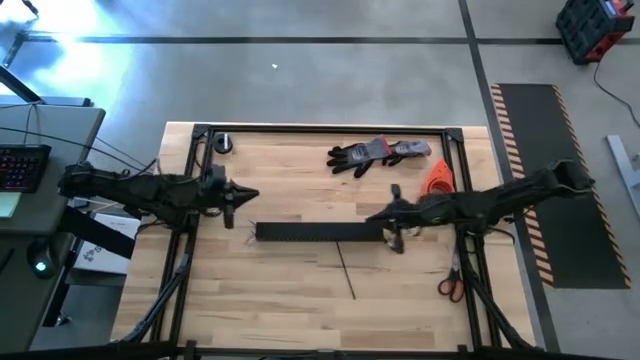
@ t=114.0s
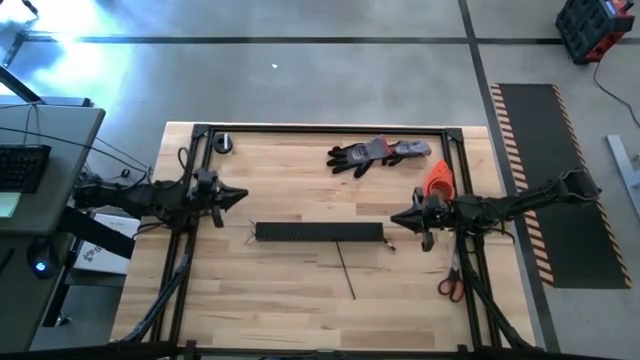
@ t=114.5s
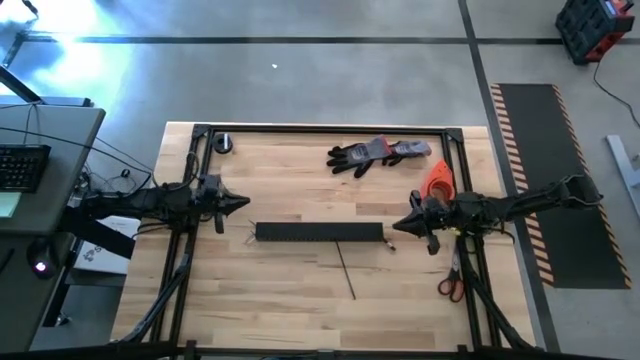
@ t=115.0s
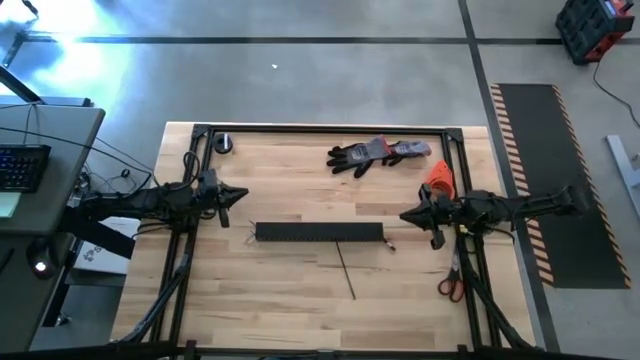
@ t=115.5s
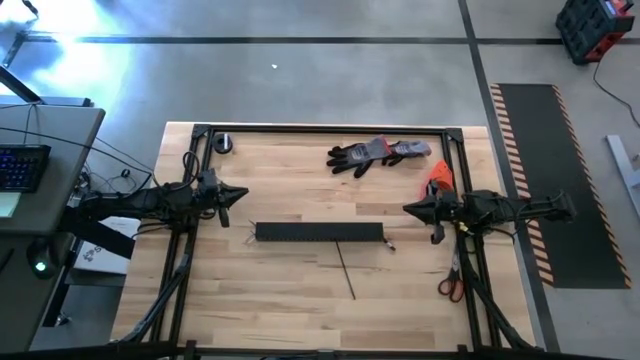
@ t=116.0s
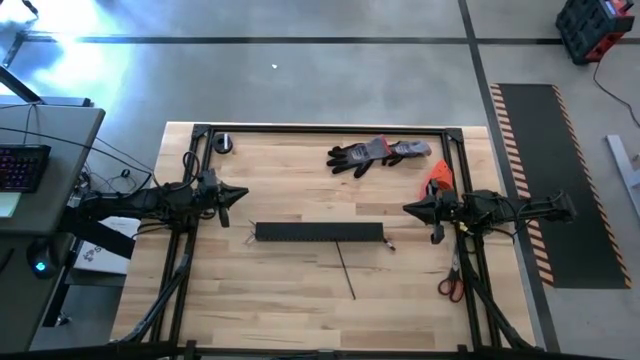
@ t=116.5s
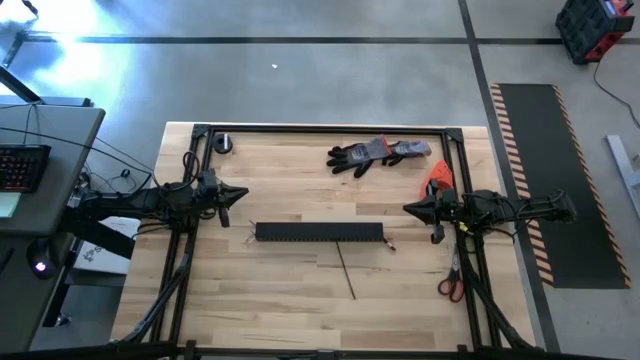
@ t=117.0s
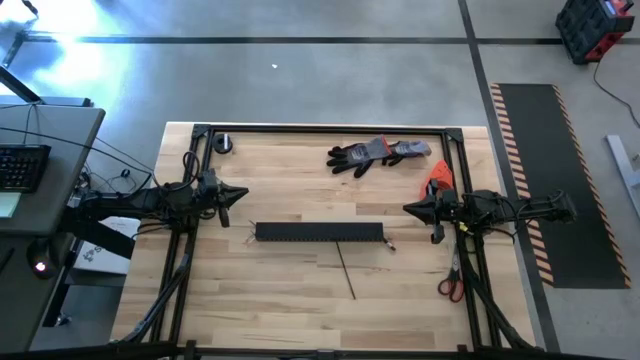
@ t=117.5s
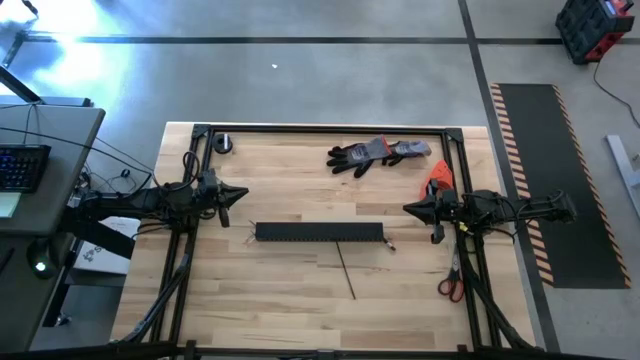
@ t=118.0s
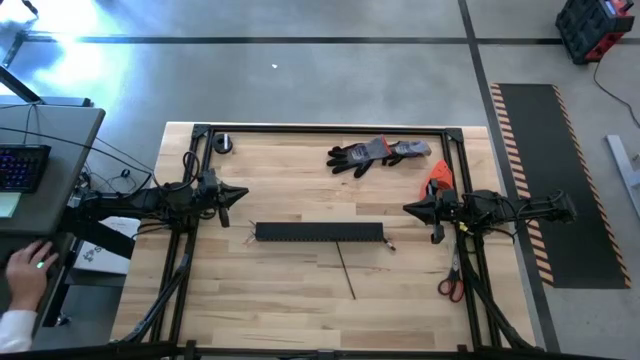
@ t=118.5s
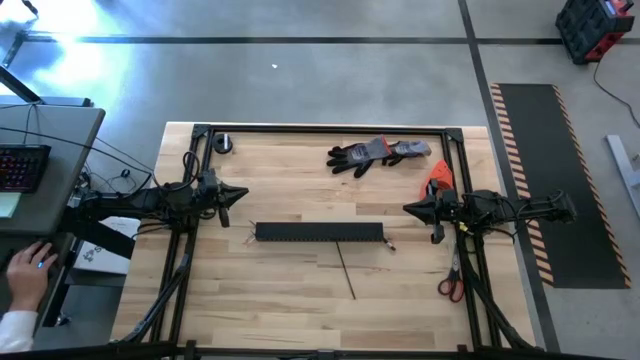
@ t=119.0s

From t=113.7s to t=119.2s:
Task: Ziptie cables
Return to Home Position

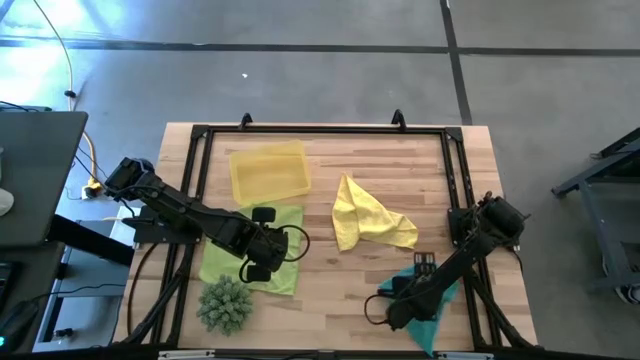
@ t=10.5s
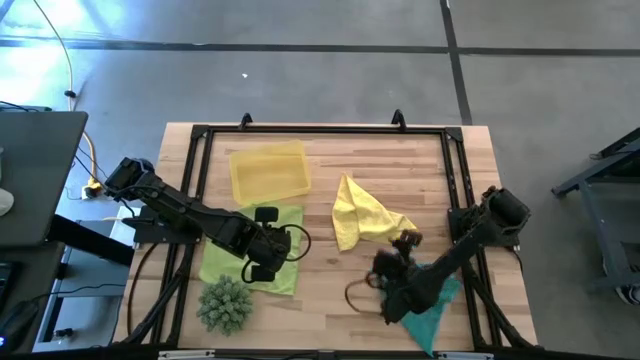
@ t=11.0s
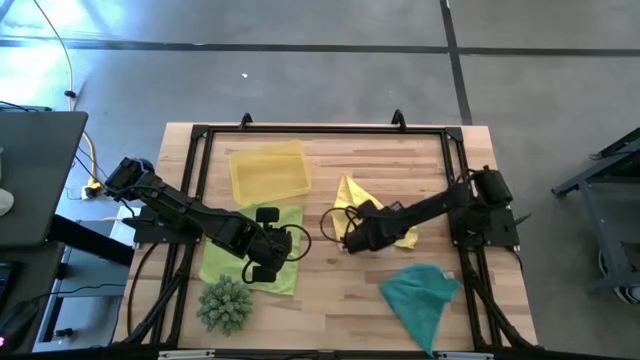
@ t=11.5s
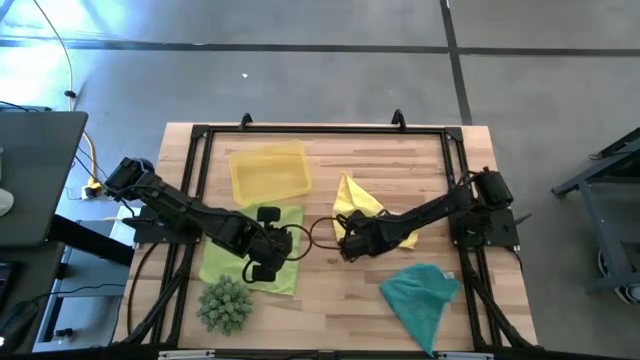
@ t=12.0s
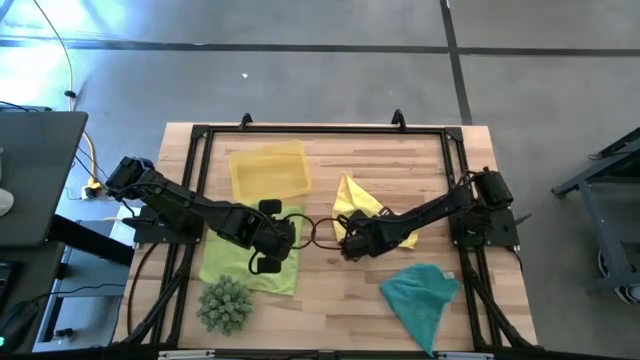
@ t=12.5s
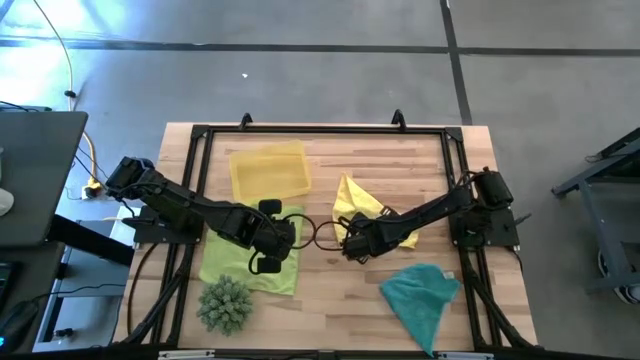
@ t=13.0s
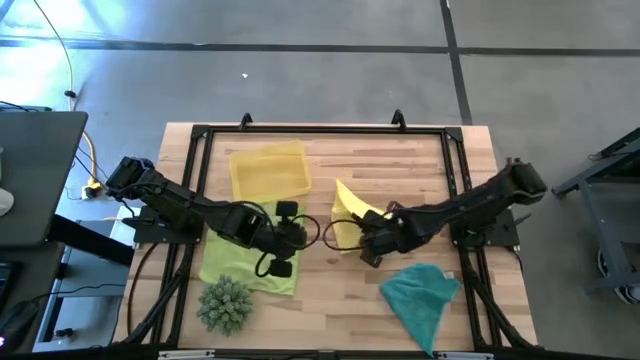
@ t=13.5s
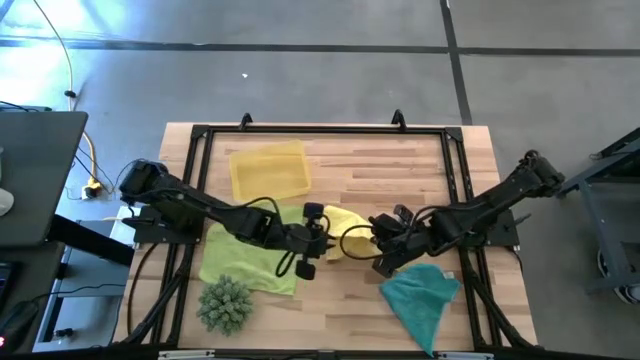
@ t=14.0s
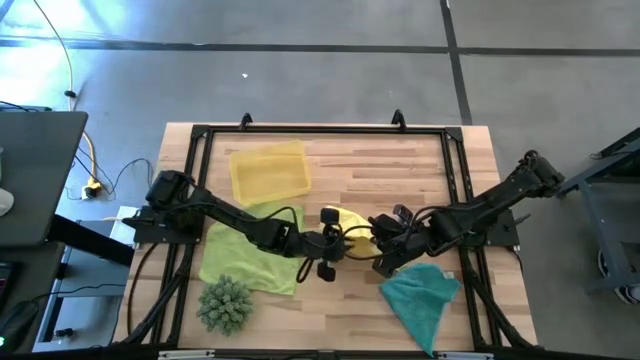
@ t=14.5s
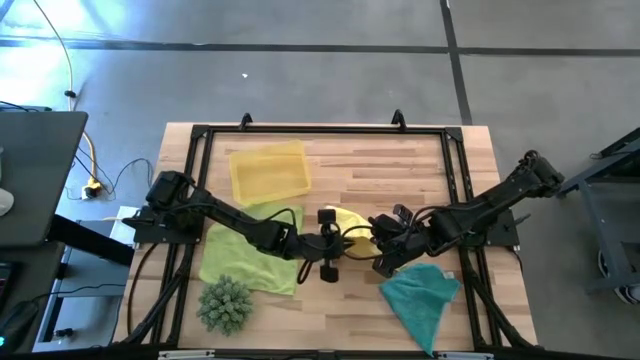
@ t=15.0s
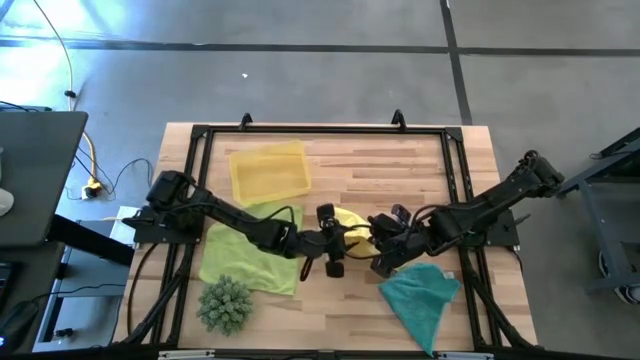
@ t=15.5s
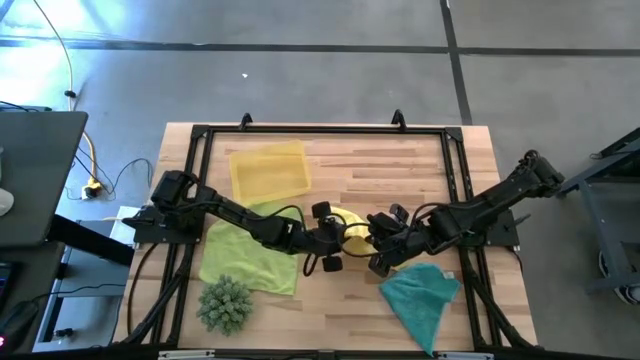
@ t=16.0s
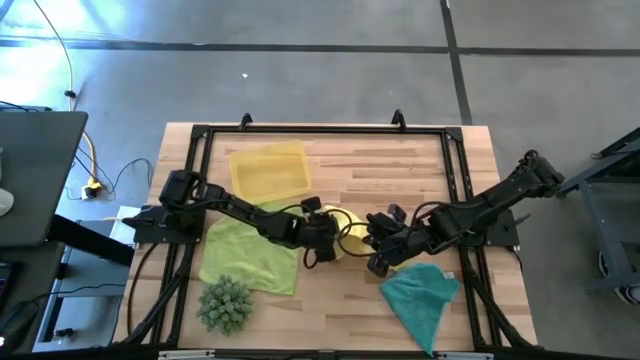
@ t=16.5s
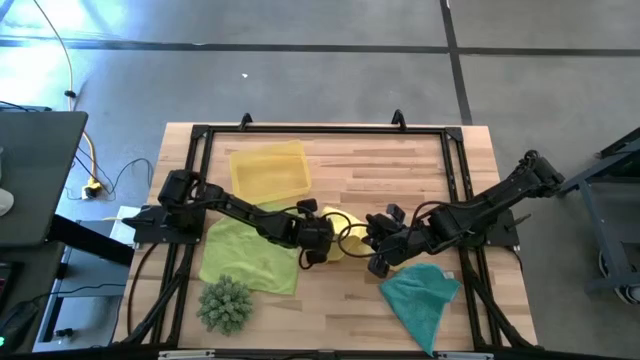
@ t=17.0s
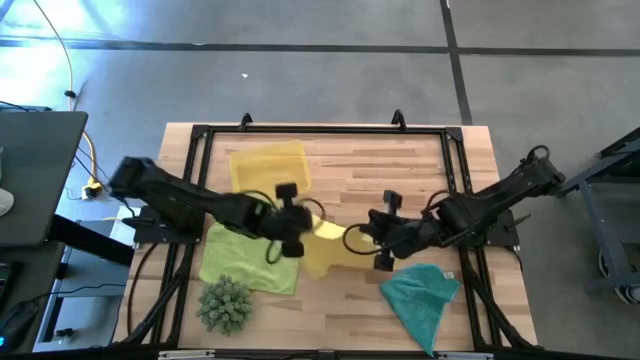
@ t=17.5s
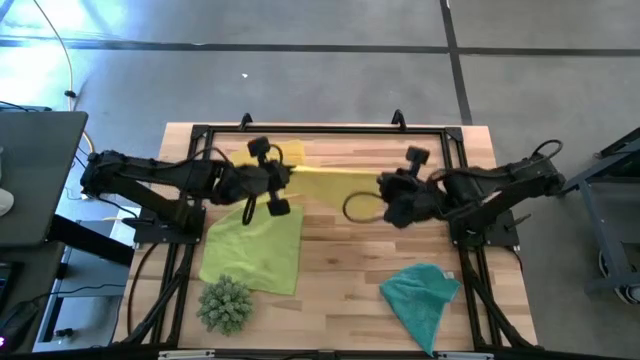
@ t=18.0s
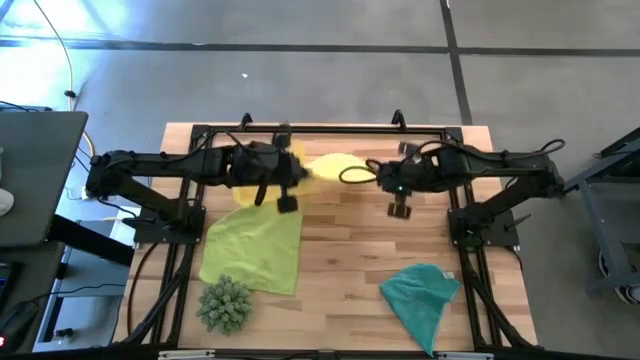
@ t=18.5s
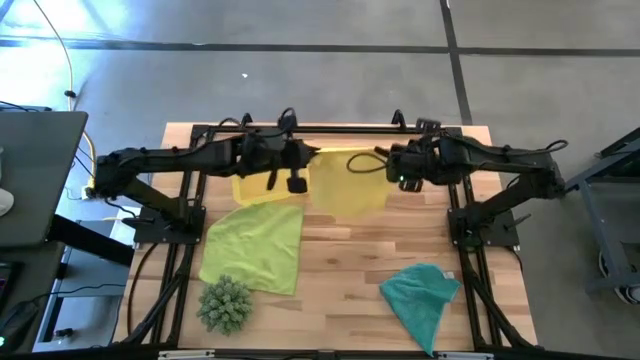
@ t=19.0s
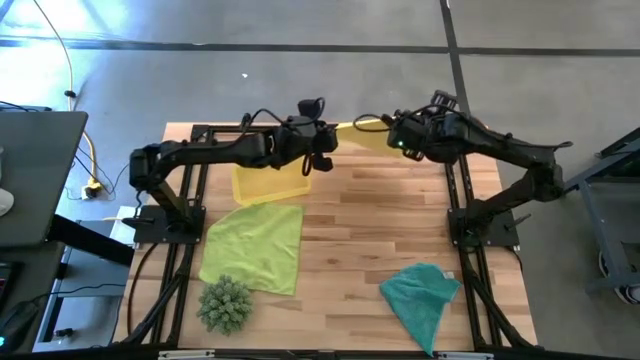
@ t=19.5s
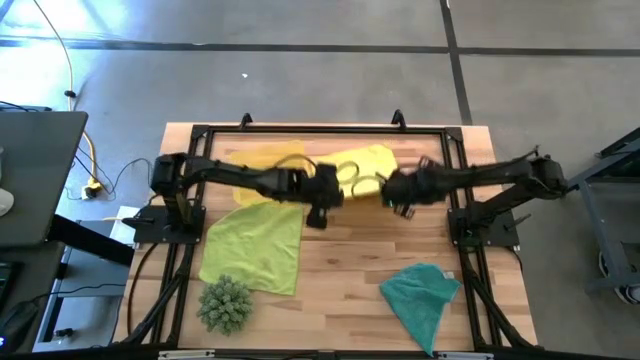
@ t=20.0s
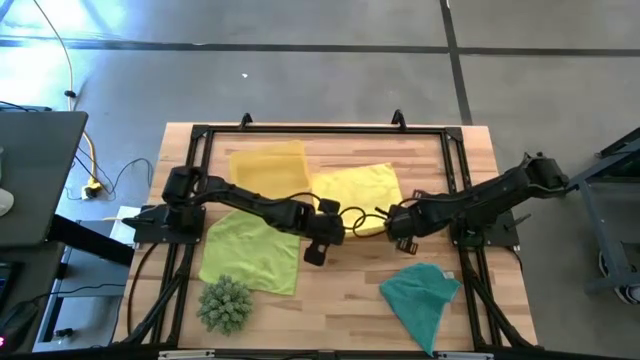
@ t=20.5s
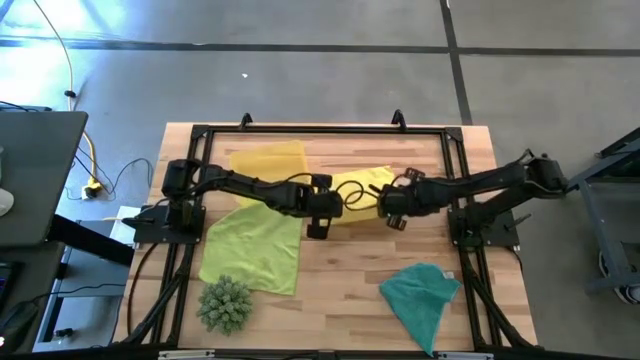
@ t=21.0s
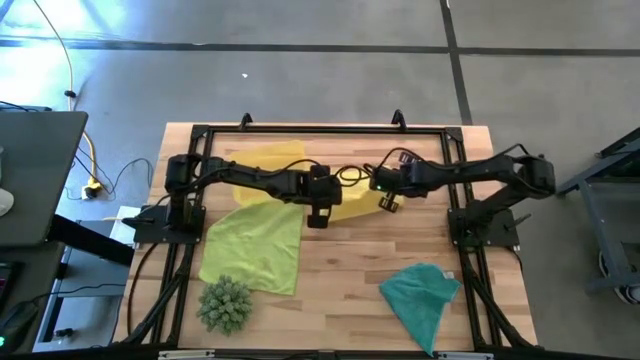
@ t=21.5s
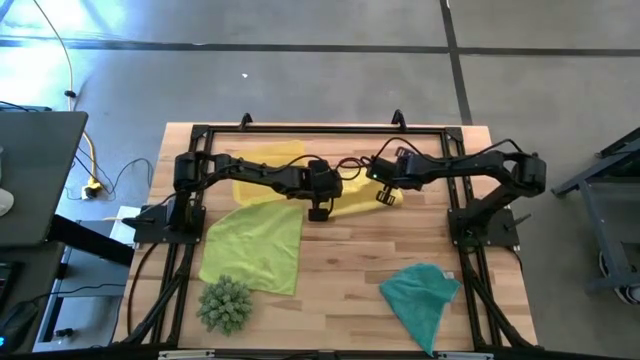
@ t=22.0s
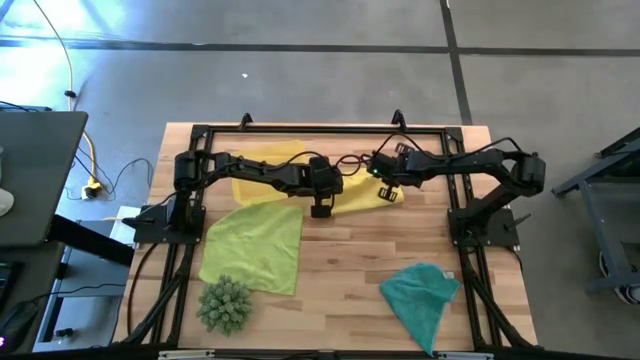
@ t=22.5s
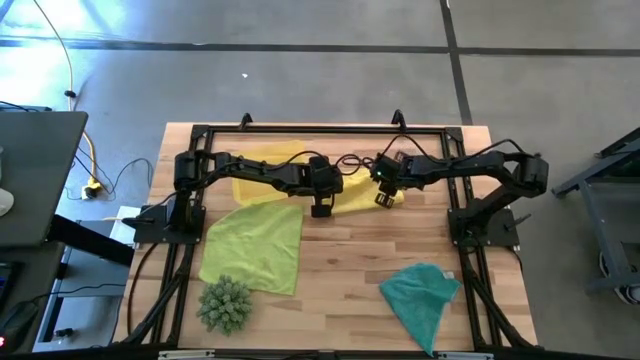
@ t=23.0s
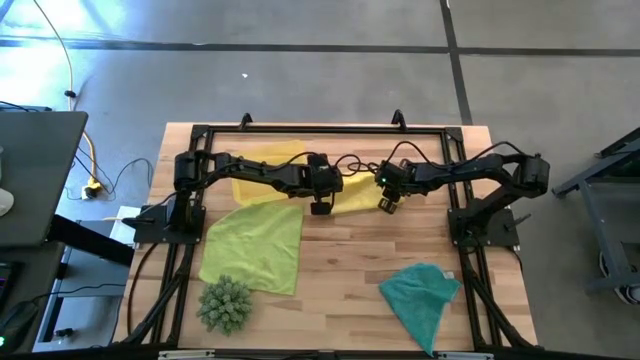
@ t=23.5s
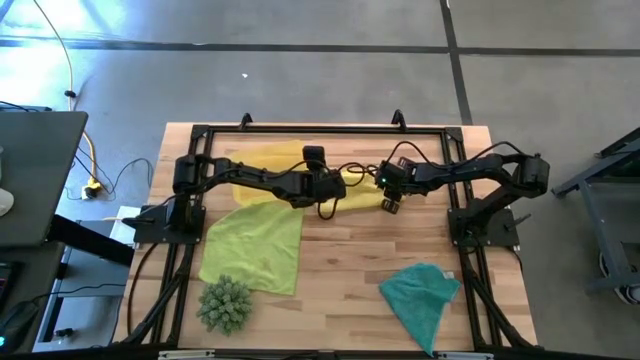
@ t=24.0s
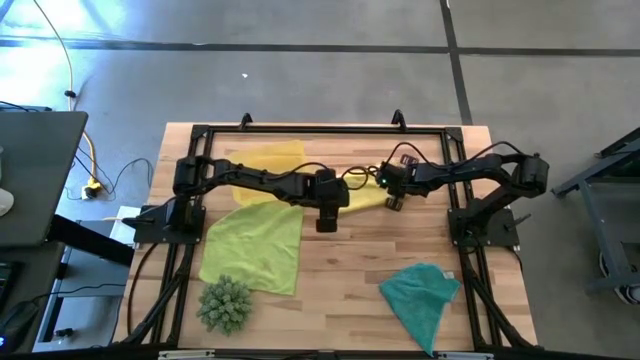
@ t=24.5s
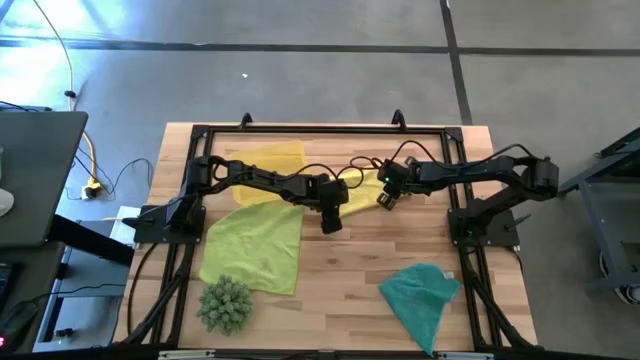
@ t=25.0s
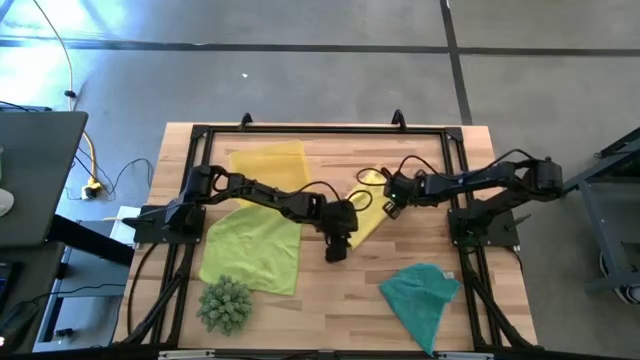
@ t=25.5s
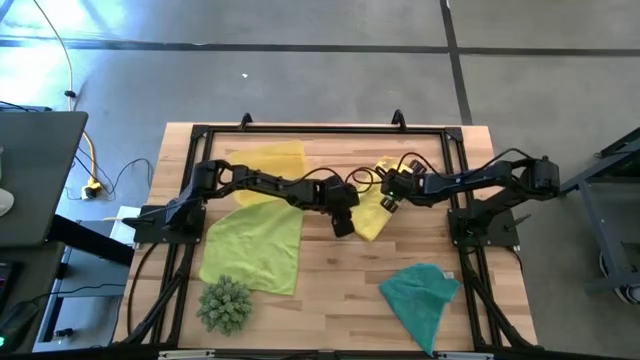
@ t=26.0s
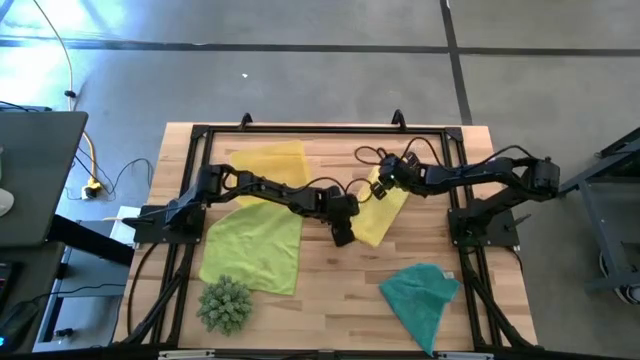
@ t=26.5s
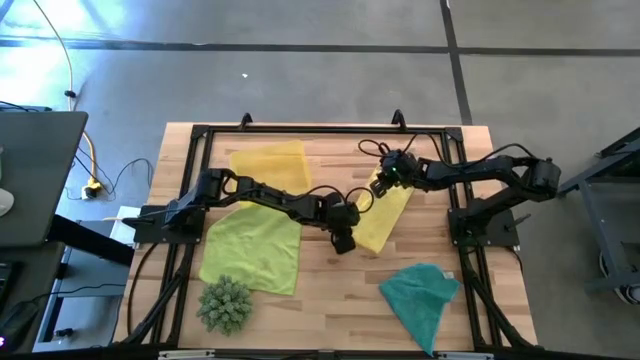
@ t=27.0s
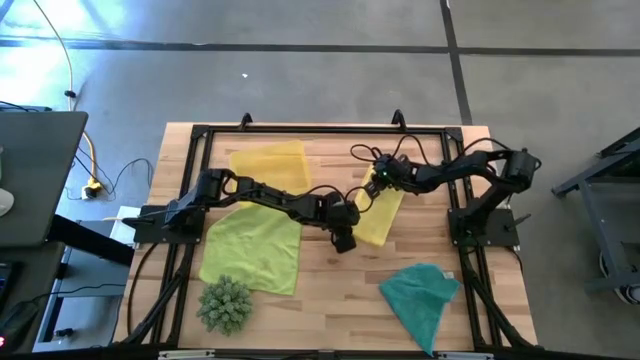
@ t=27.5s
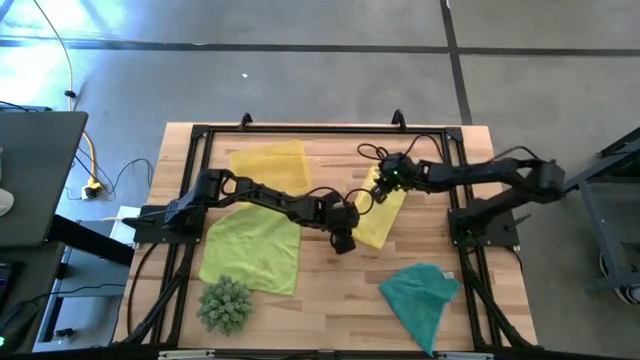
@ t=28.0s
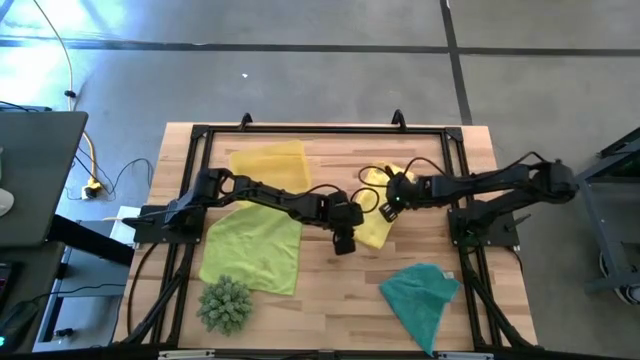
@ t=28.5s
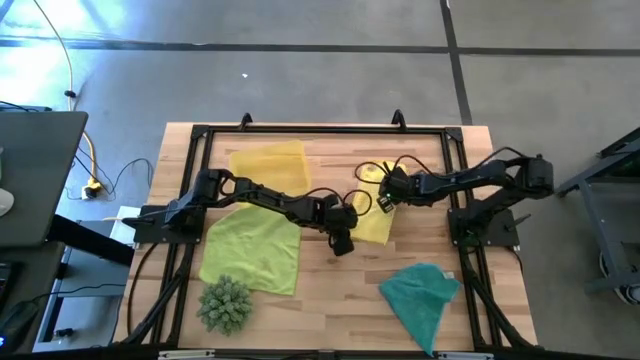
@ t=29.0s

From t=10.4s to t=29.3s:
Task: Roll microfiber towels into tight, uniform cylinder then place into a basket
Roll the yellow microfiber towel
